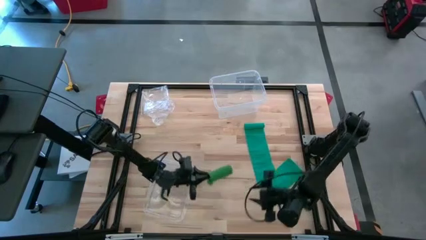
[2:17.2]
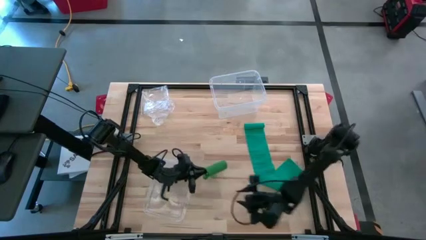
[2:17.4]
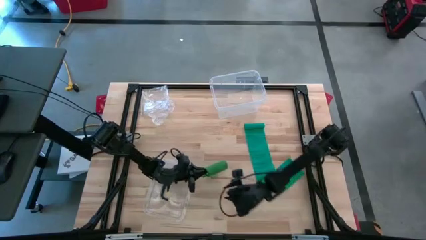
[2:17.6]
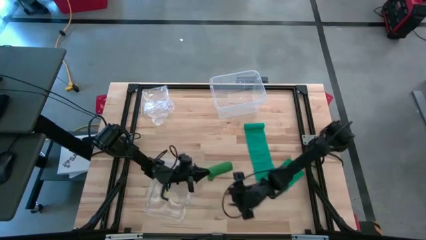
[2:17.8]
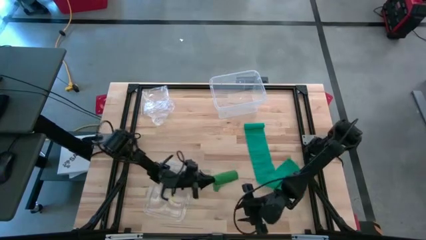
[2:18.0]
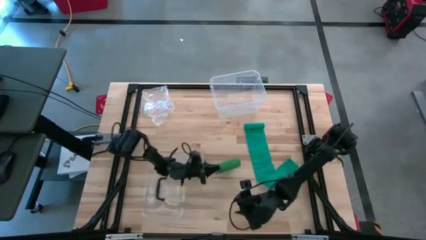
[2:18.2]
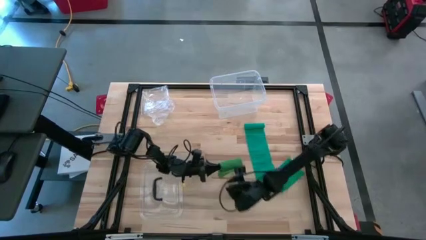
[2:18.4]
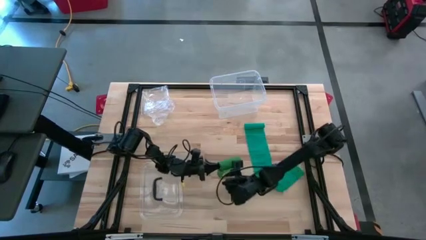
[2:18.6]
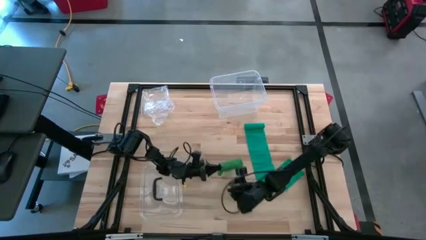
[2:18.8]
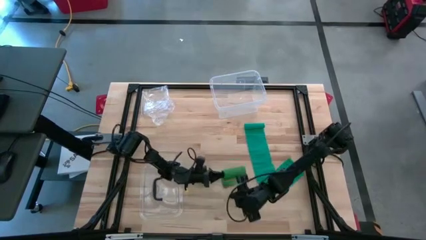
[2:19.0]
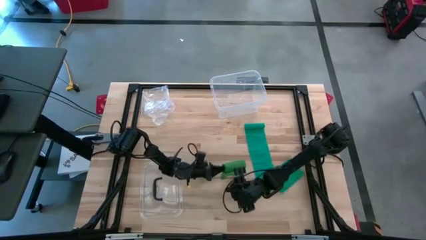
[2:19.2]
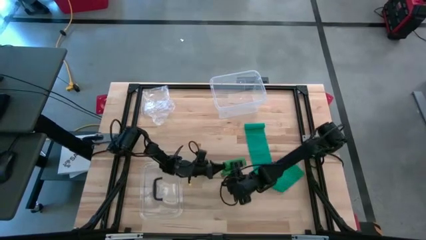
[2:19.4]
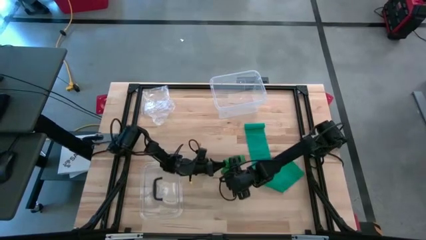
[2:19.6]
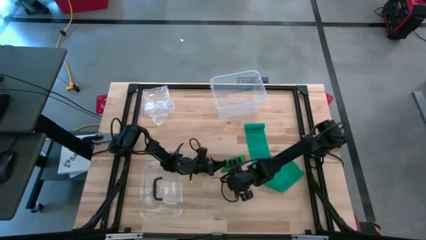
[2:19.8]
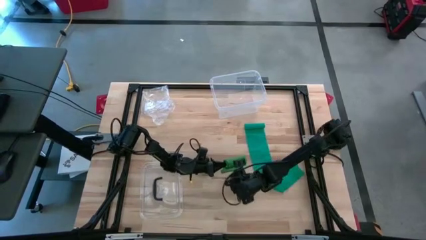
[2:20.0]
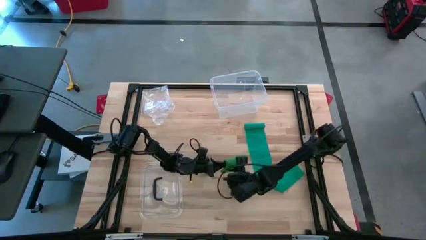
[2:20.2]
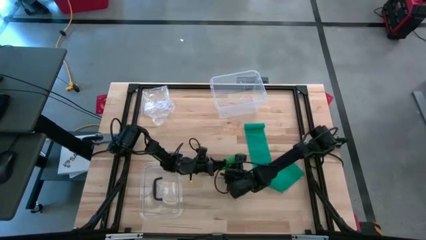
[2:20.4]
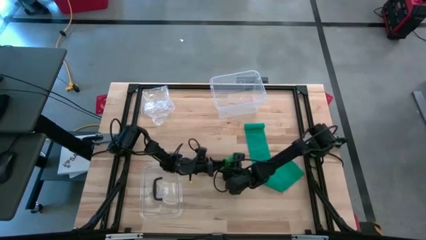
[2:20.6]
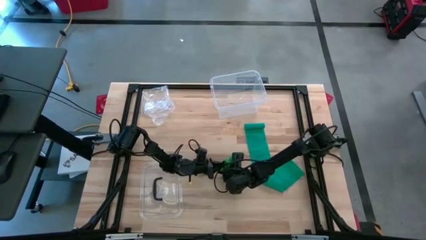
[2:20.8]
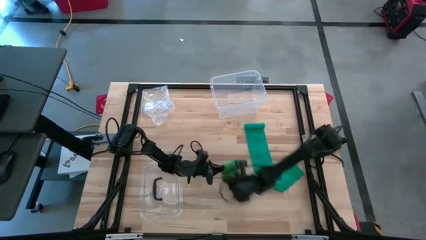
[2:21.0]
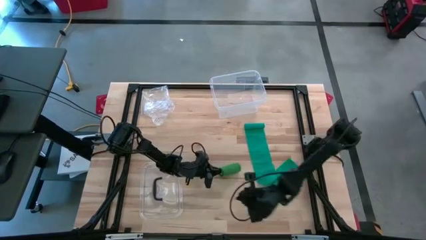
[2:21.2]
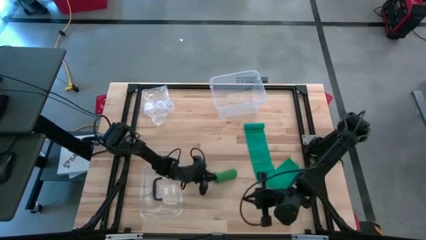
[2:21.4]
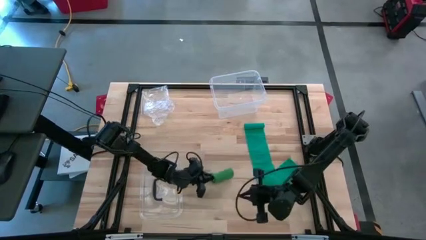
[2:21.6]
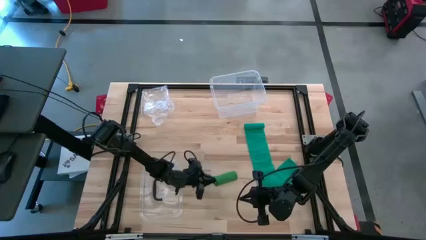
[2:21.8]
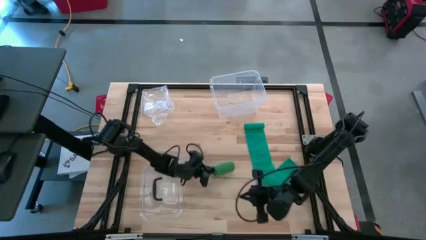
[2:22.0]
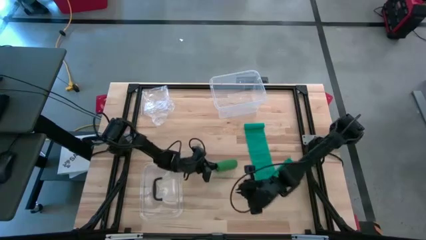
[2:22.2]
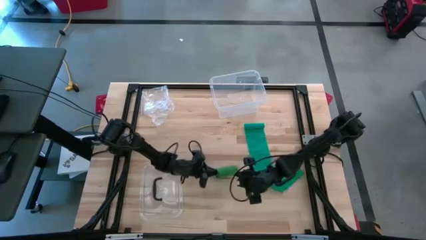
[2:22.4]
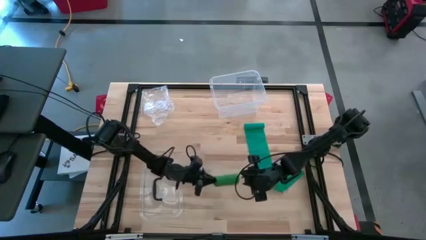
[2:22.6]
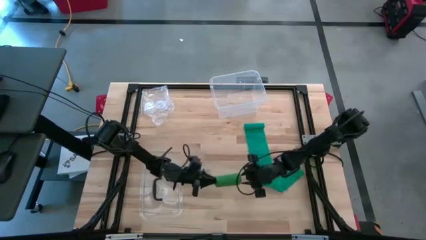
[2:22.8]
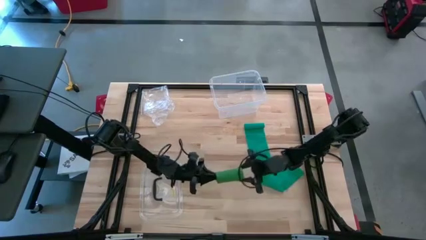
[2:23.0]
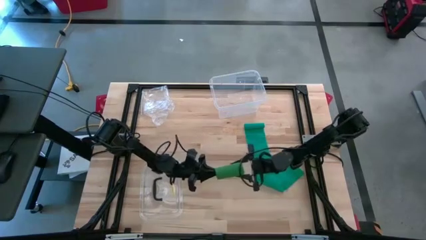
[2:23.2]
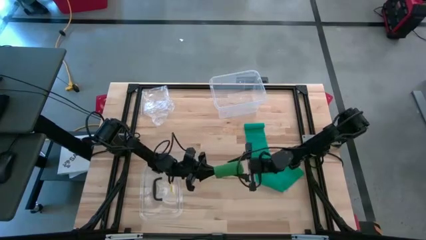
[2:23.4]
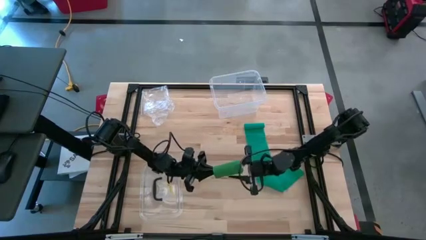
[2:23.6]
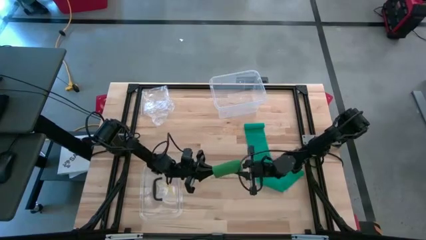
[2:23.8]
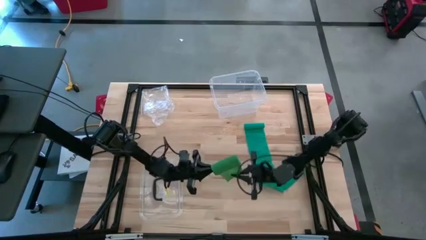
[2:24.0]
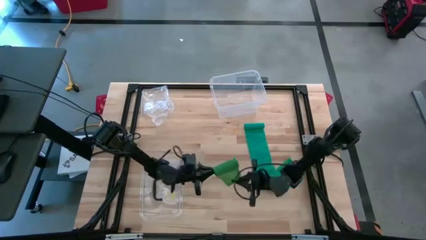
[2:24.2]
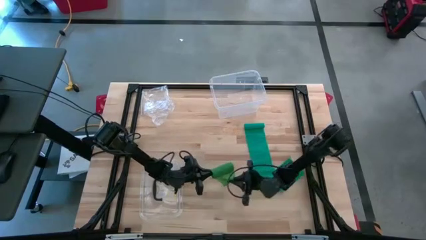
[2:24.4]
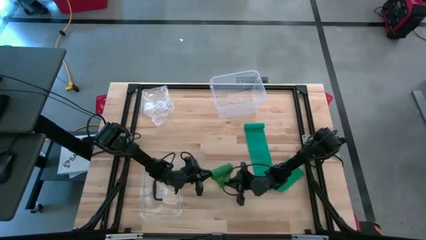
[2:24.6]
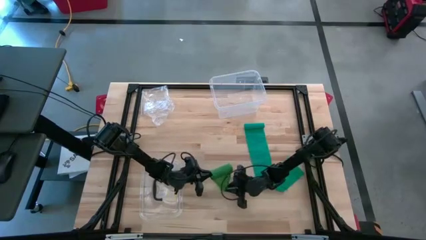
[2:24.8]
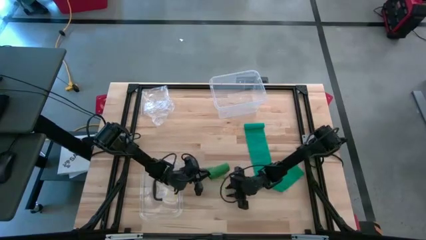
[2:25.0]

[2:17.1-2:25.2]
Task: Roll bandage
Roll the green bandage

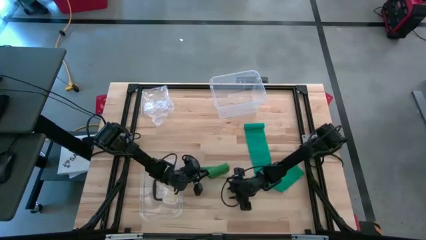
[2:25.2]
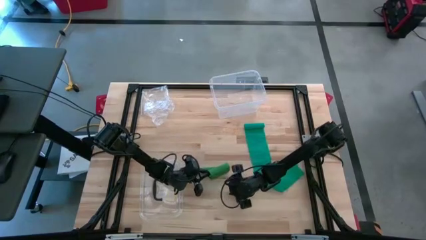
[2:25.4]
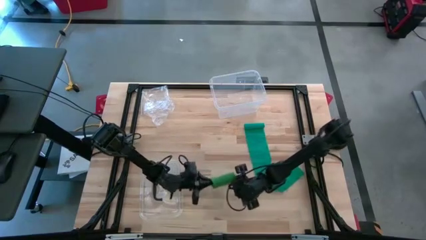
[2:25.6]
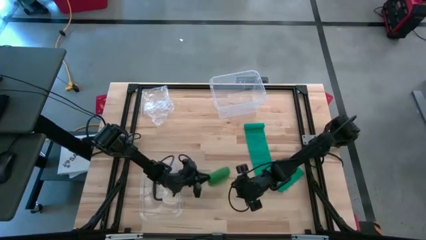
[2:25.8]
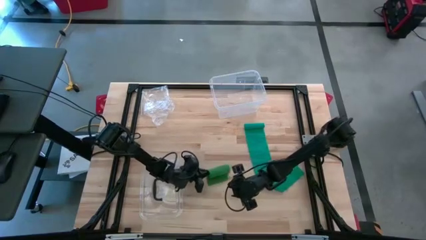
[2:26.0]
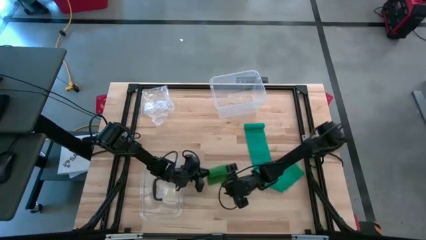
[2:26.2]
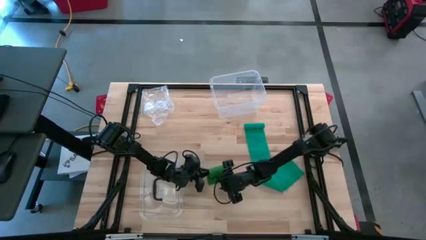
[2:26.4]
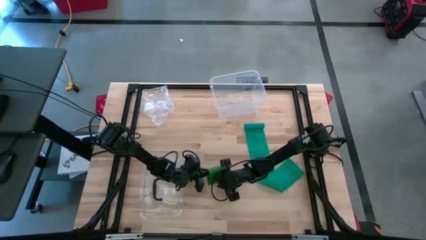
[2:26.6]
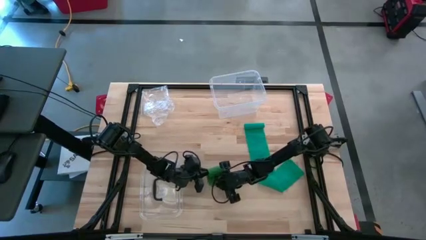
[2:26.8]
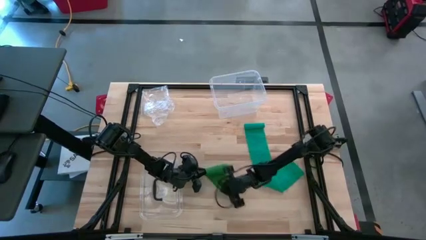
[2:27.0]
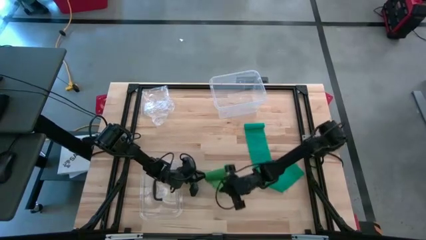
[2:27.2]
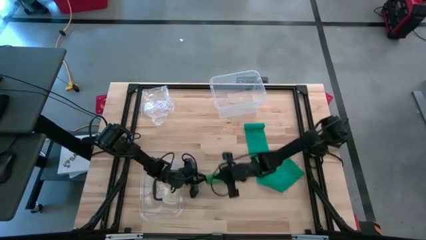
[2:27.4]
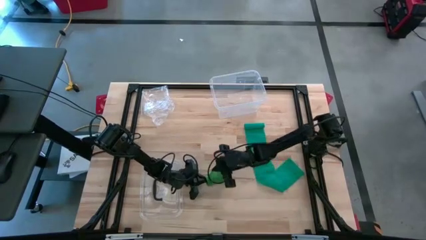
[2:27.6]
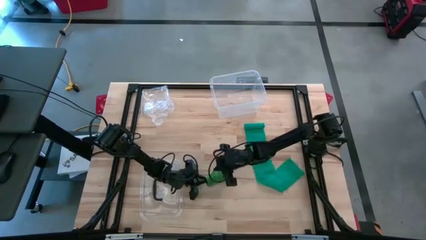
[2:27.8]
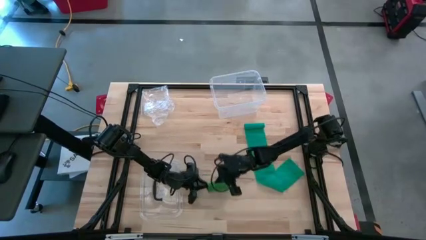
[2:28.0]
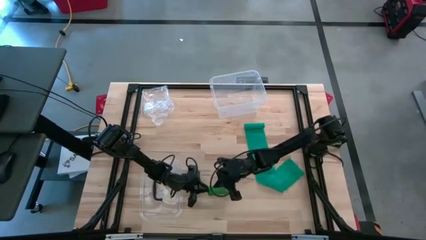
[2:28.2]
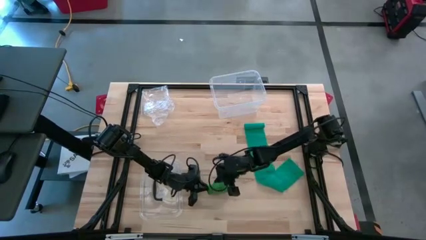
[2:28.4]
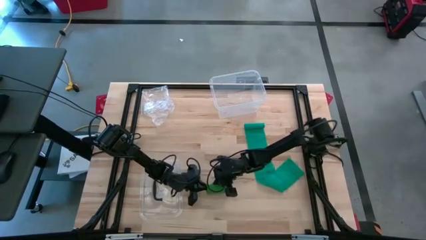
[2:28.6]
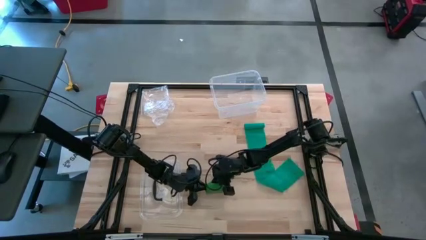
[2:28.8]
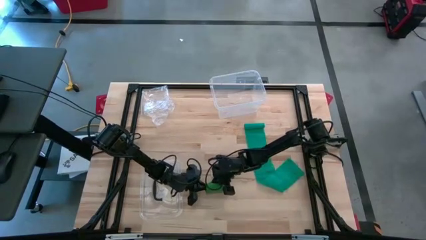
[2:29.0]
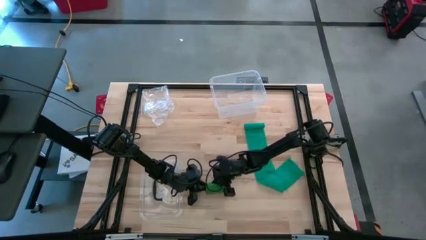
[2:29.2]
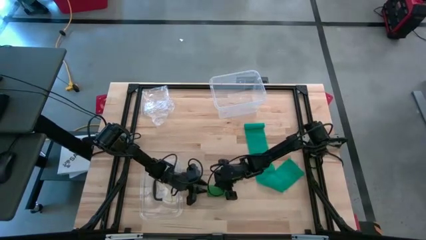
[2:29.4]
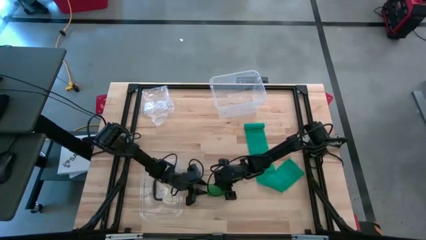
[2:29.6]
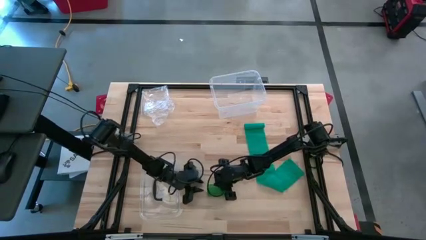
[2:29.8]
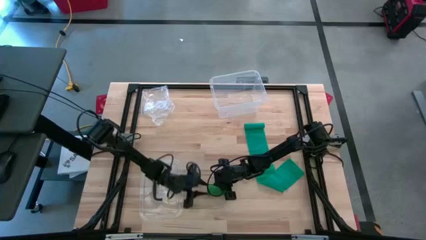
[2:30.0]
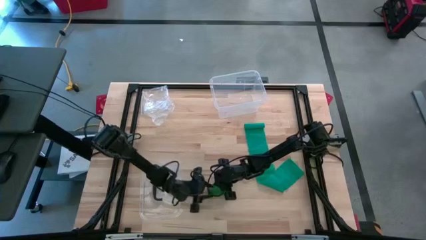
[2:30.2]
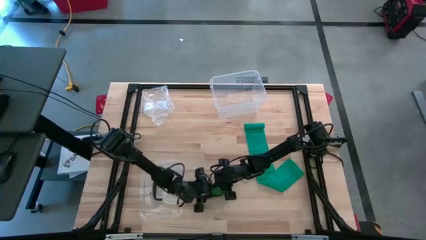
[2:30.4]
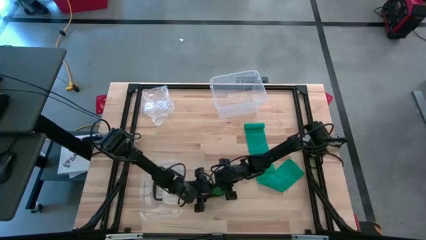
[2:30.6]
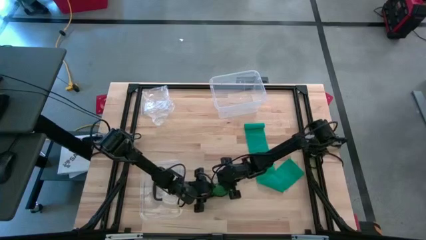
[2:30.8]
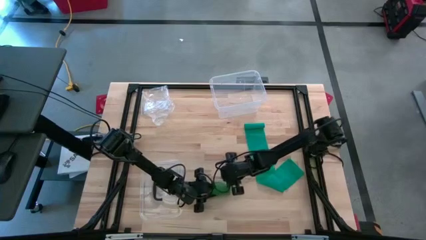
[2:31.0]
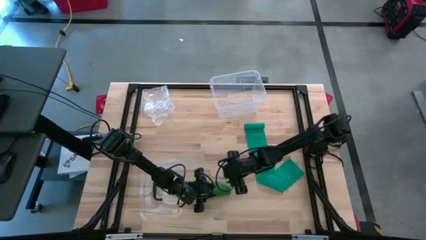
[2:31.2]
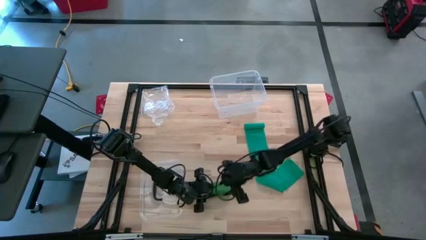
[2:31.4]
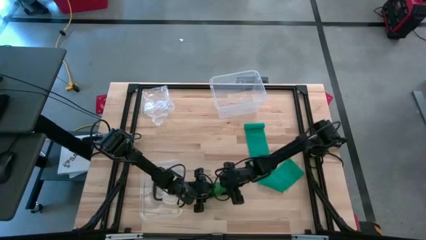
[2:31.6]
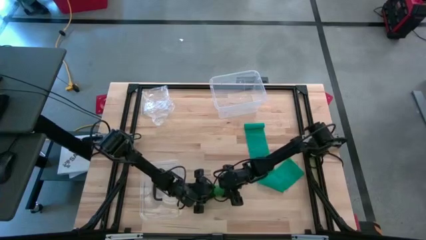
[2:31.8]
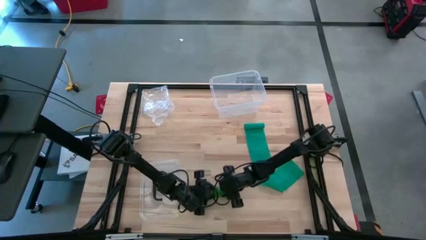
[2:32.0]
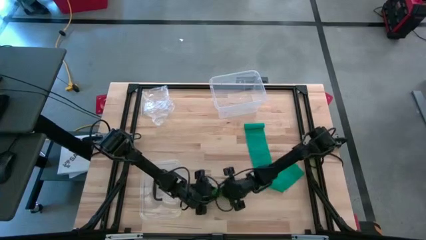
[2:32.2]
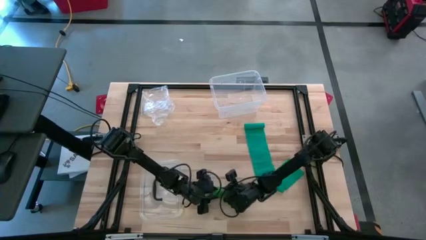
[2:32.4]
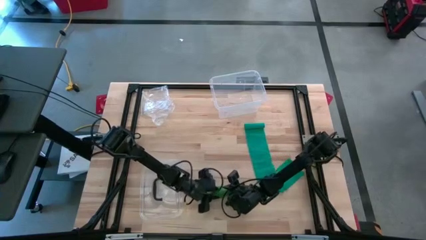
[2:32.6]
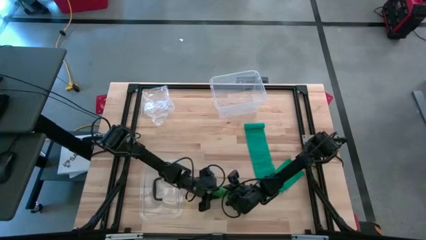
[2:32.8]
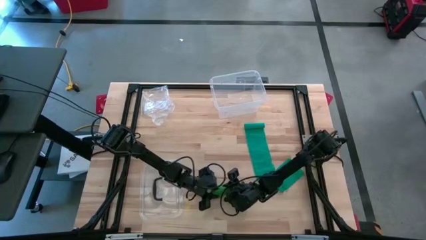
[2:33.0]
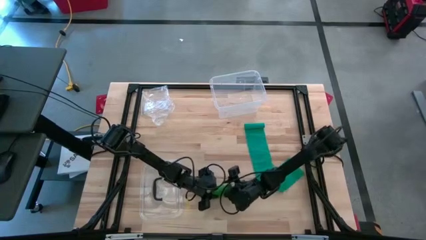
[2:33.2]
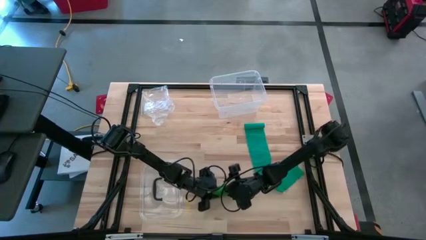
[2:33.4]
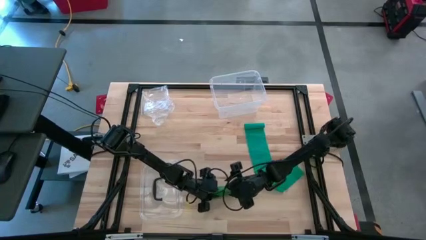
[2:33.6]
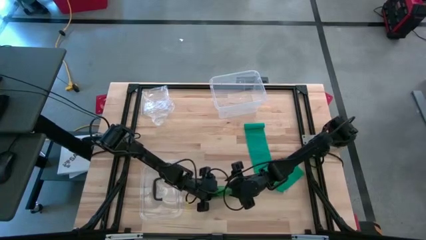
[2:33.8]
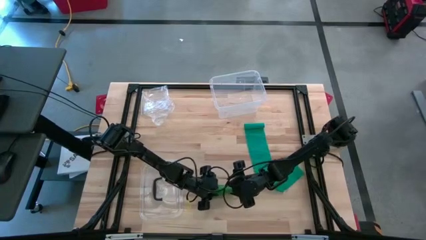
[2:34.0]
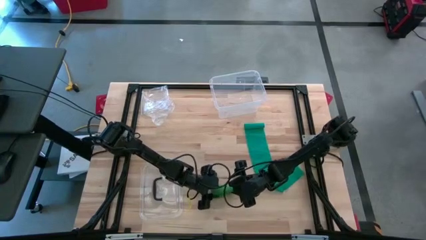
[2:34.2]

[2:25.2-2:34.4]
Roll the green bandage
